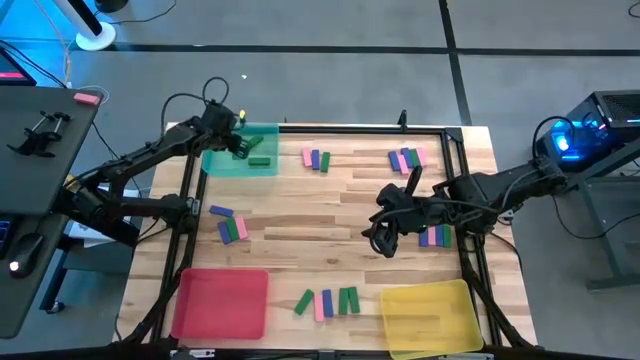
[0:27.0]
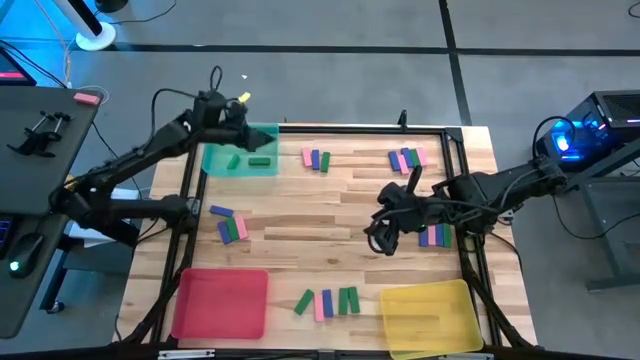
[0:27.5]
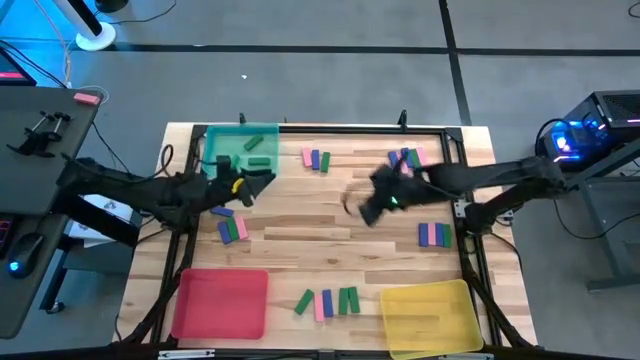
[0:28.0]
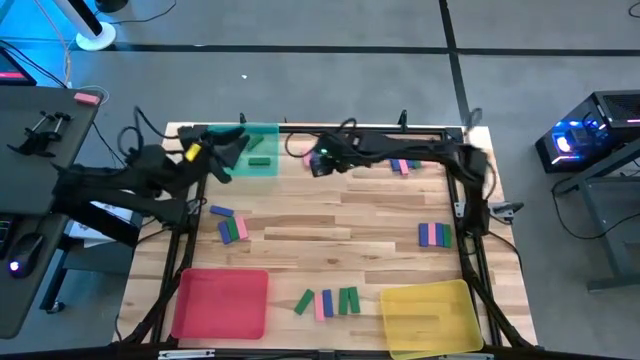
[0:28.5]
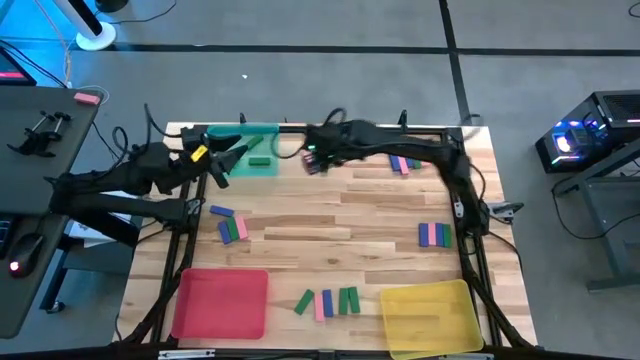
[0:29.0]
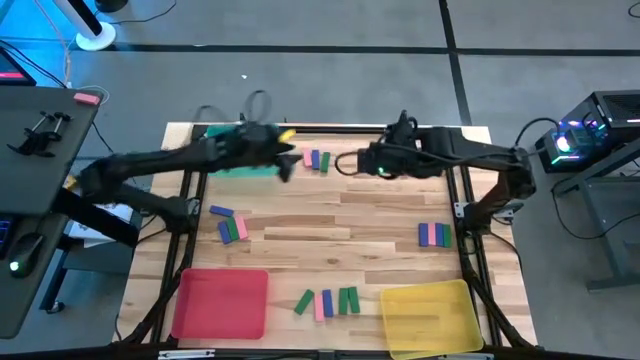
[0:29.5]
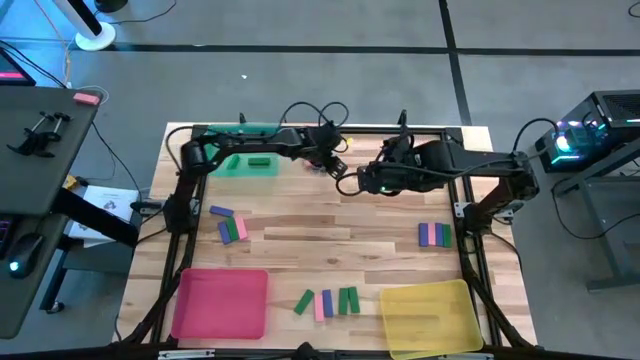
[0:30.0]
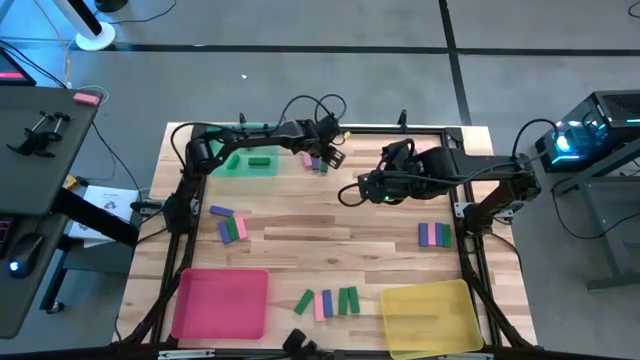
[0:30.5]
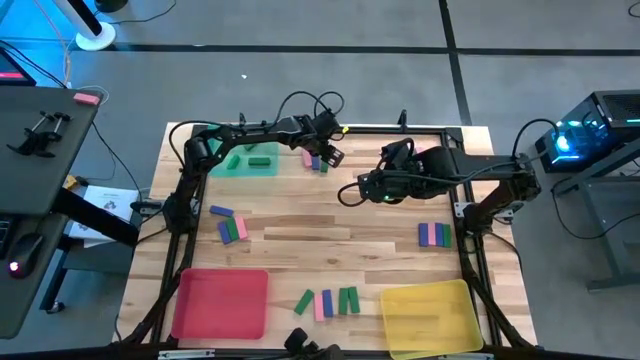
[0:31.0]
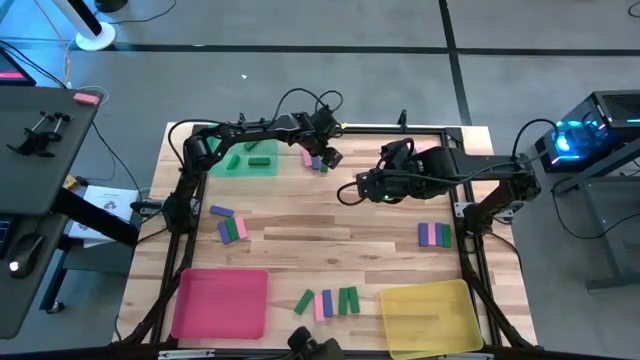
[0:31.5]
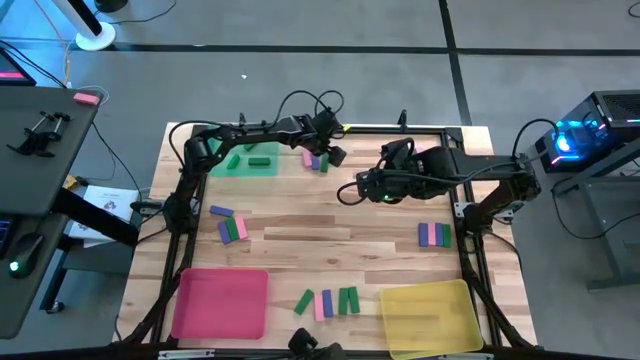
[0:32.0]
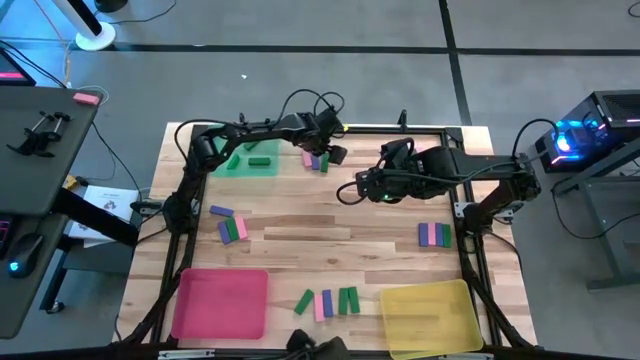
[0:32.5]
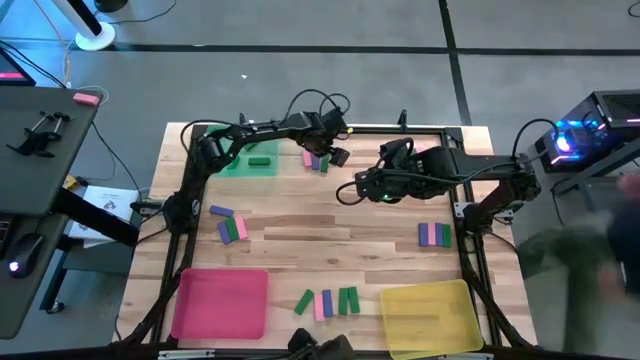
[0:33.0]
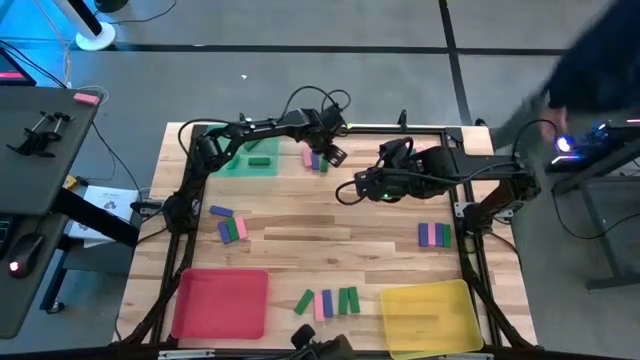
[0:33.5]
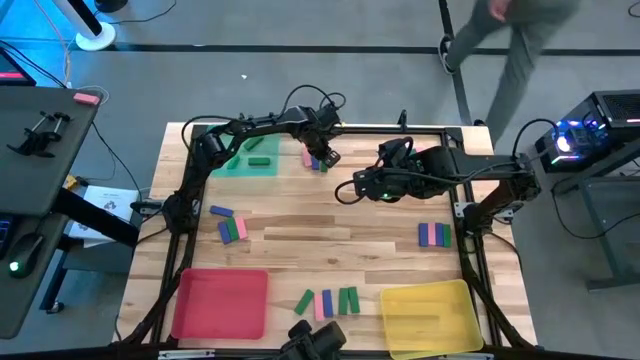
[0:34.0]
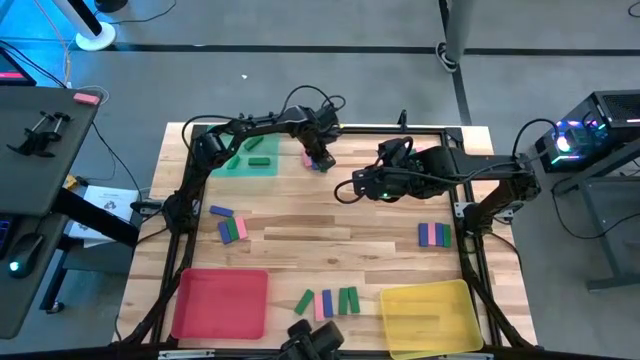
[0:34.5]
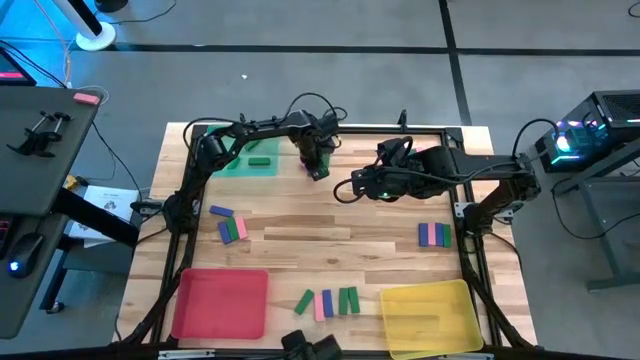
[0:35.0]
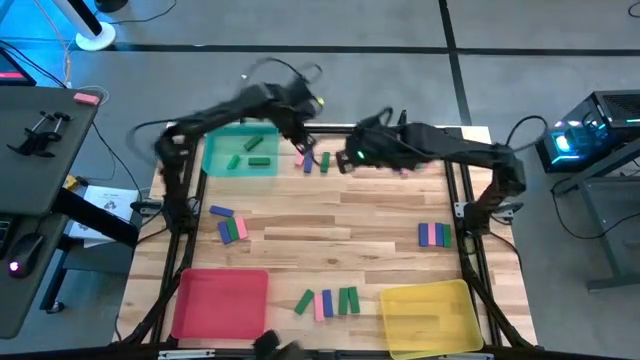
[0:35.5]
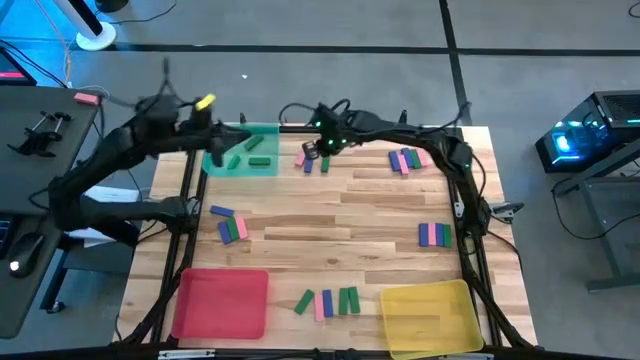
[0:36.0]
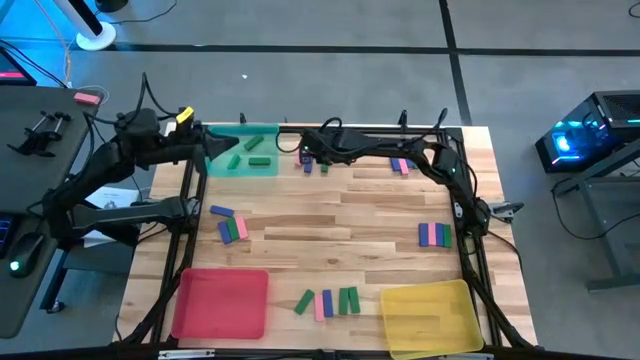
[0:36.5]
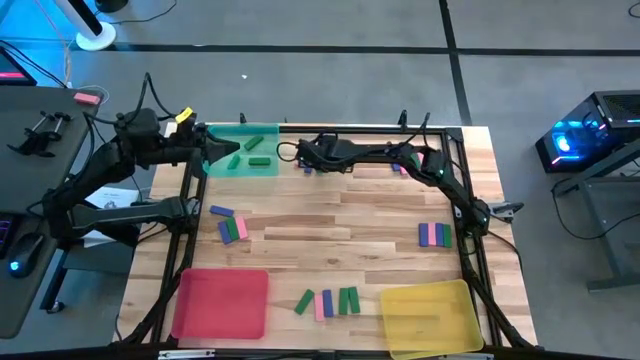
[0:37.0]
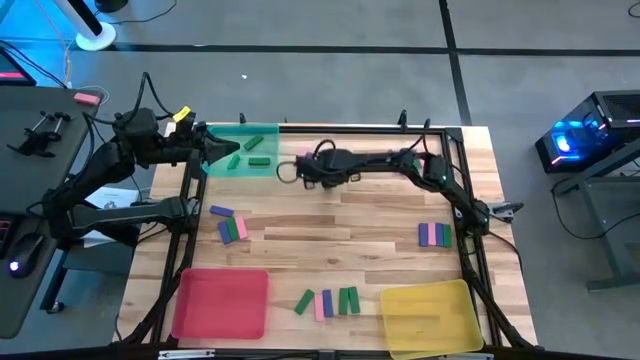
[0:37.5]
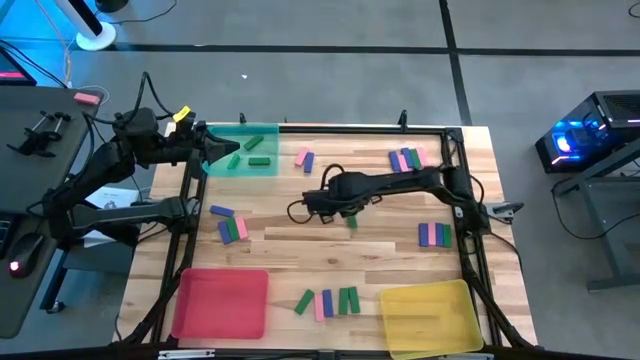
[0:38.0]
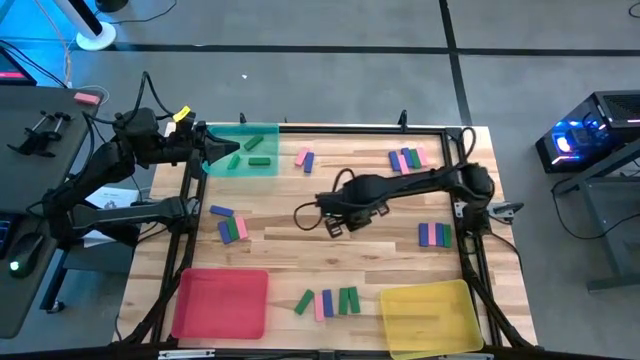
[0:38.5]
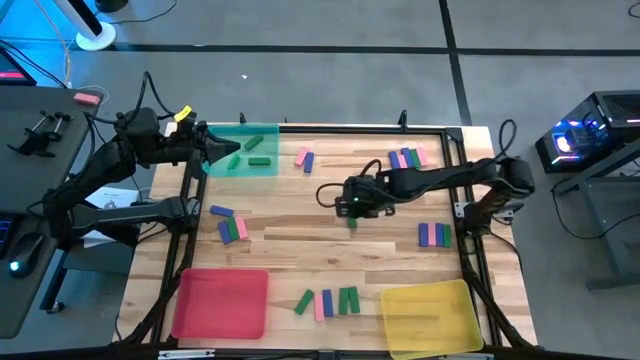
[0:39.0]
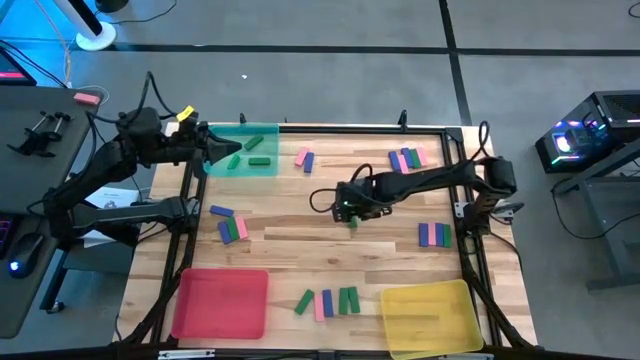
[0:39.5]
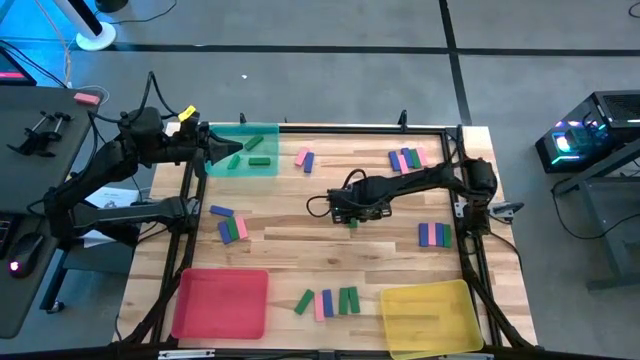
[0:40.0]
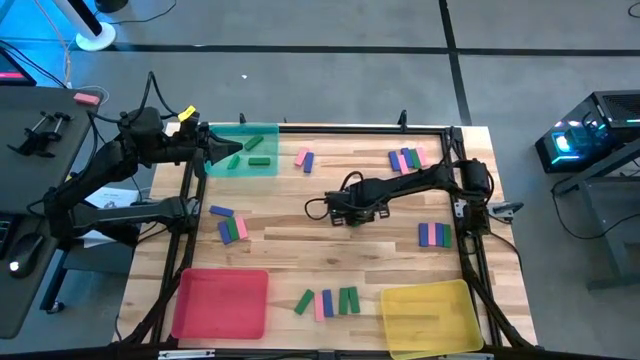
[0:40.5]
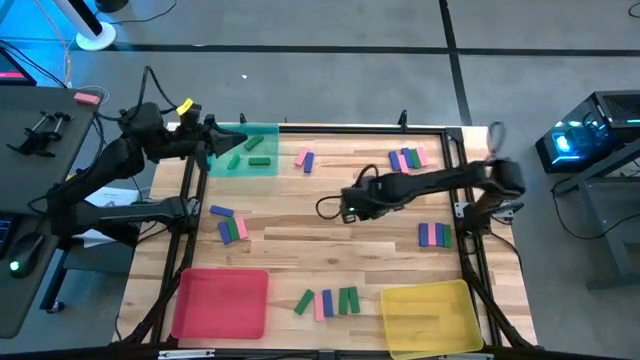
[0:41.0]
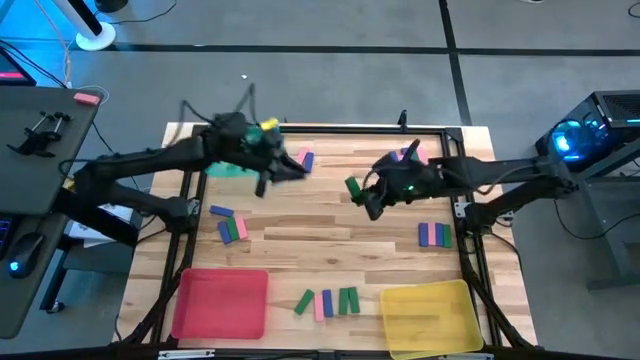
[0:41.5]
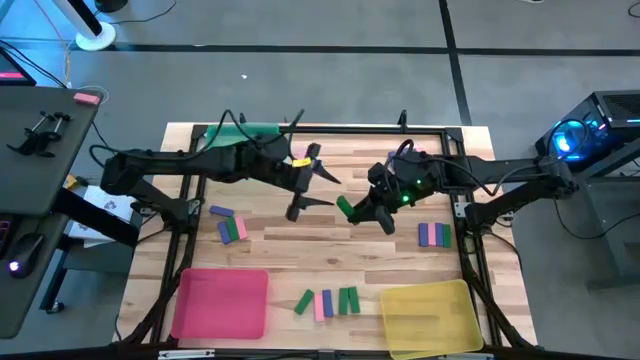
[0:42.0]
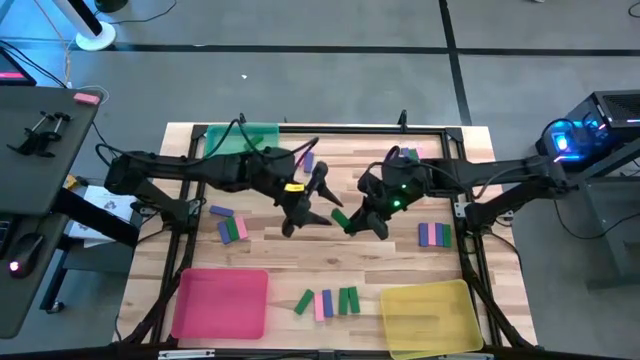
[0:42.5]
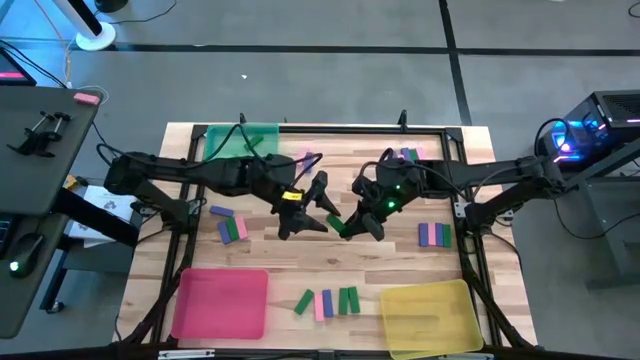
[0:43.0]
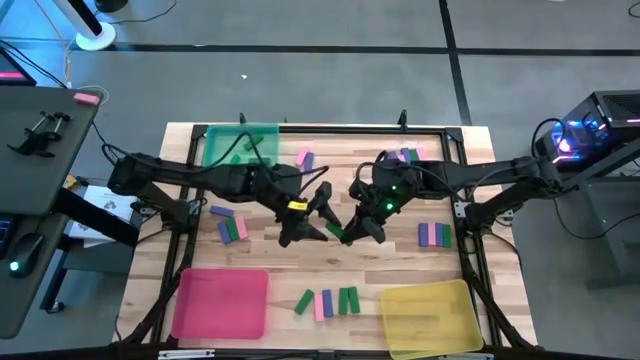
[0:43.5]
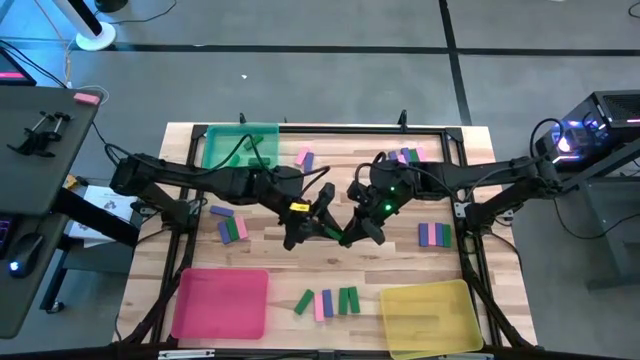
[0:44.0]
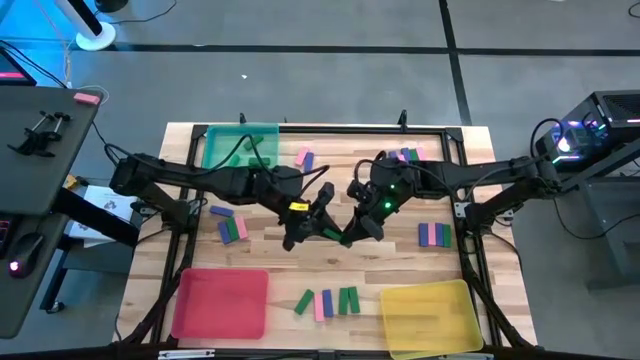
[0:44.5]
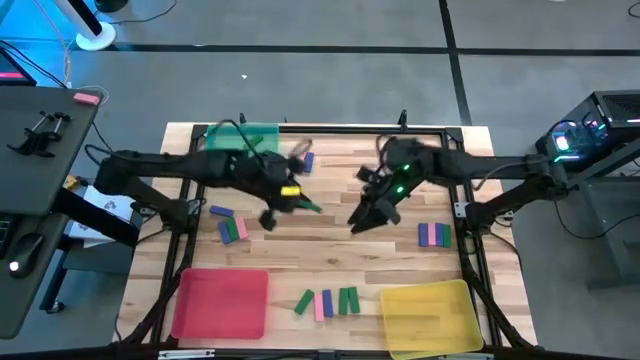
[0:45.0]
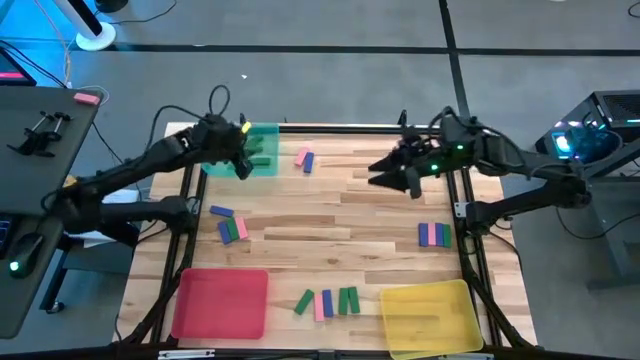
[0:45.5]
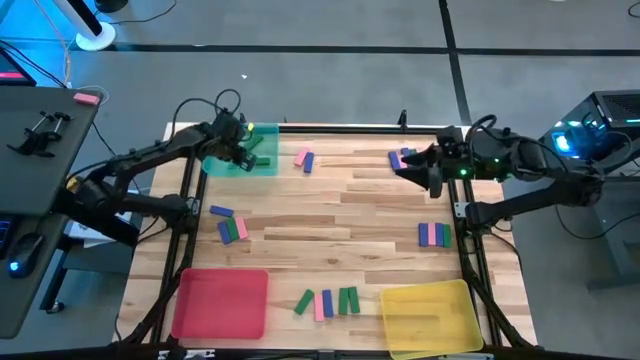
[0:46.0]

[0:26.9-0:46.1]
Task: Sort blocks
Put the green block into the blue bin
